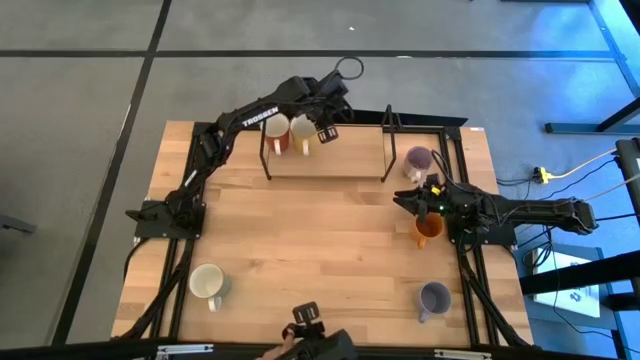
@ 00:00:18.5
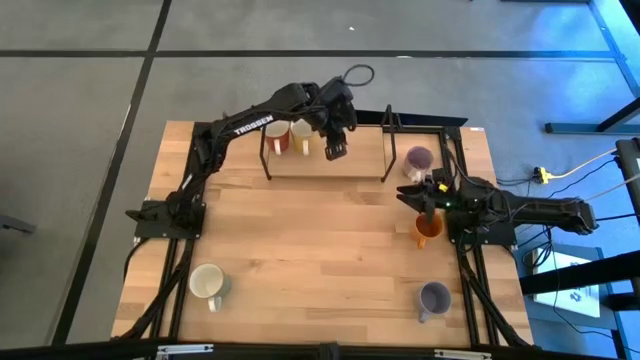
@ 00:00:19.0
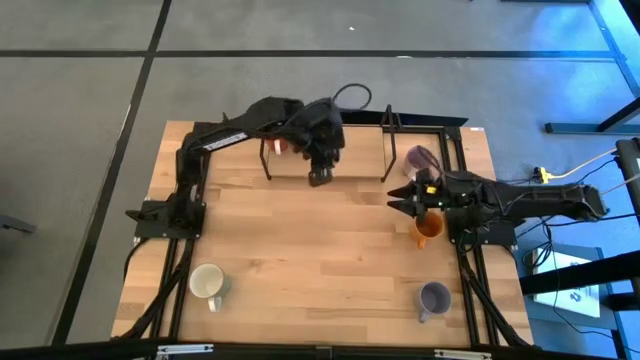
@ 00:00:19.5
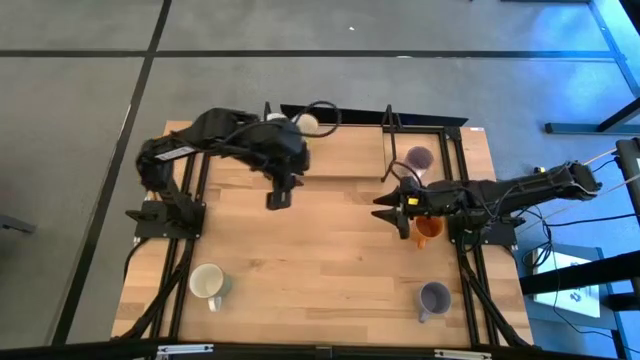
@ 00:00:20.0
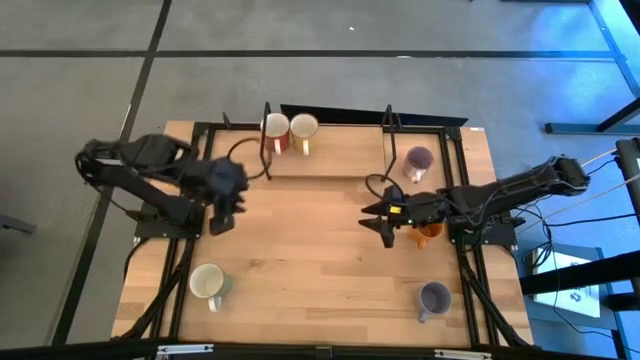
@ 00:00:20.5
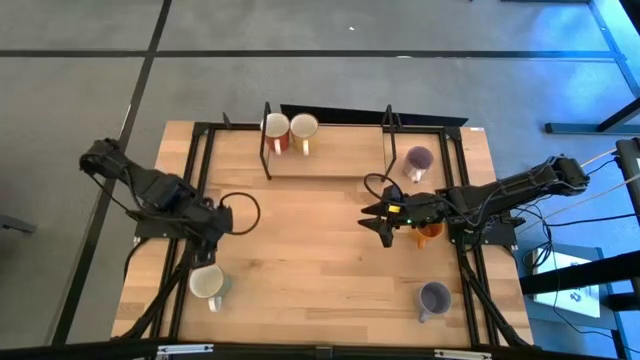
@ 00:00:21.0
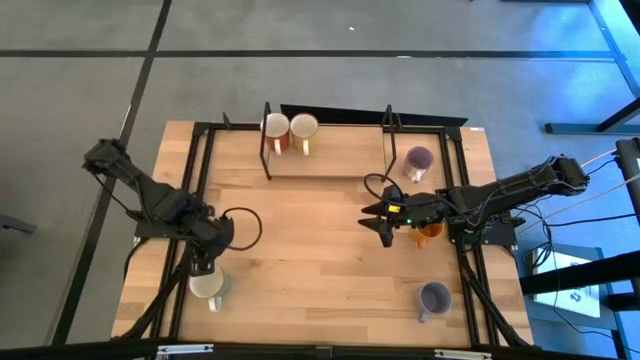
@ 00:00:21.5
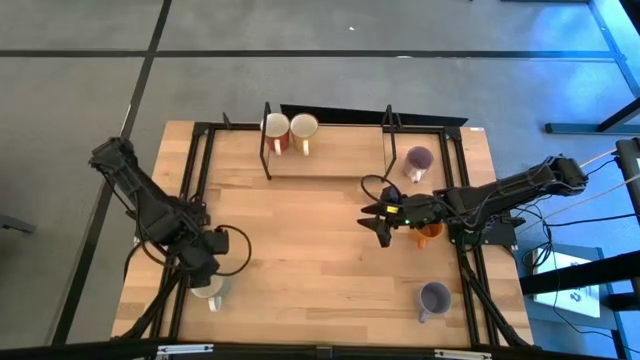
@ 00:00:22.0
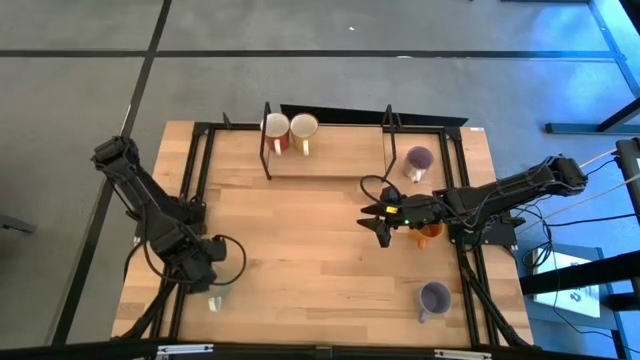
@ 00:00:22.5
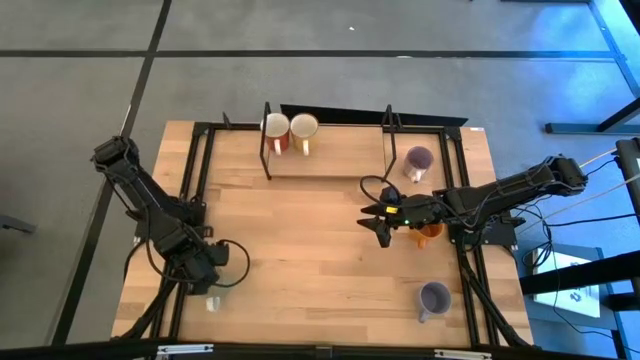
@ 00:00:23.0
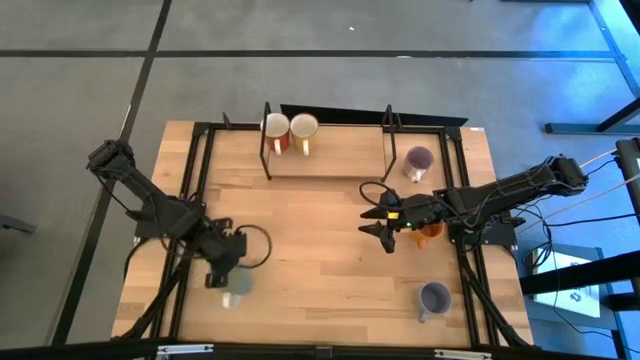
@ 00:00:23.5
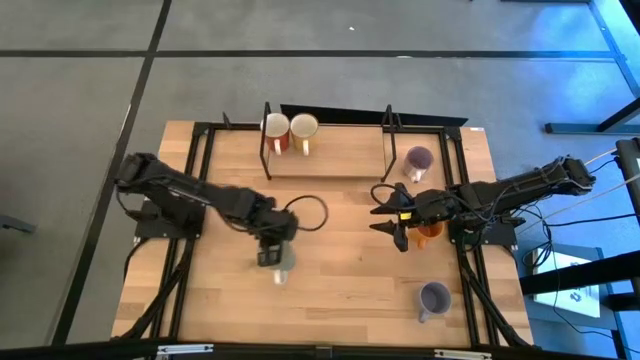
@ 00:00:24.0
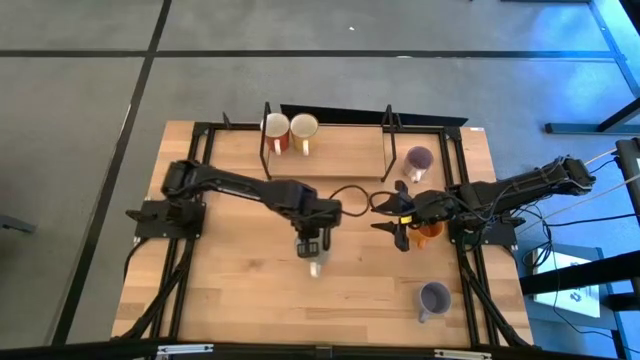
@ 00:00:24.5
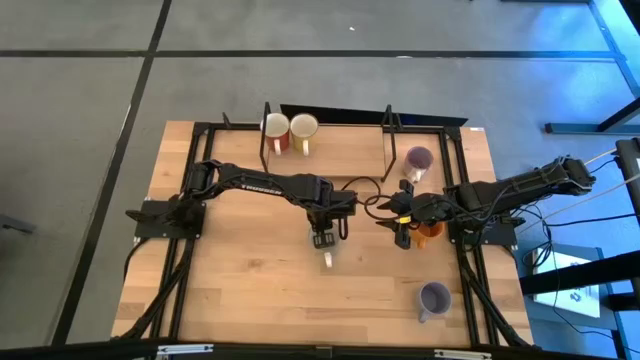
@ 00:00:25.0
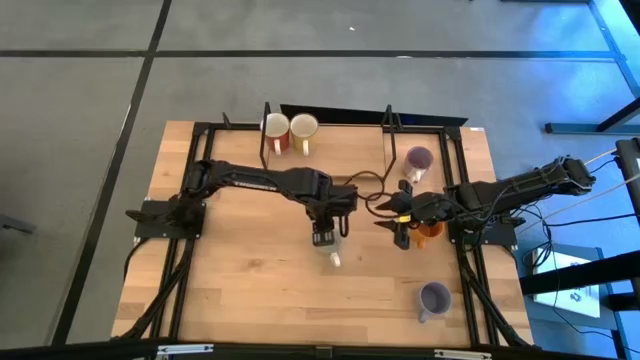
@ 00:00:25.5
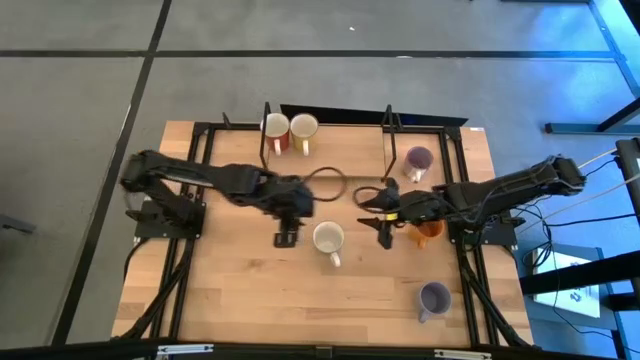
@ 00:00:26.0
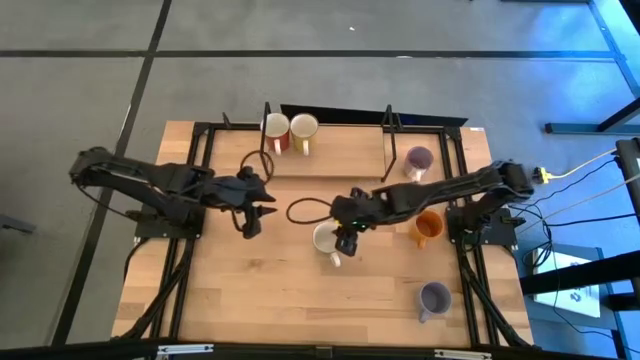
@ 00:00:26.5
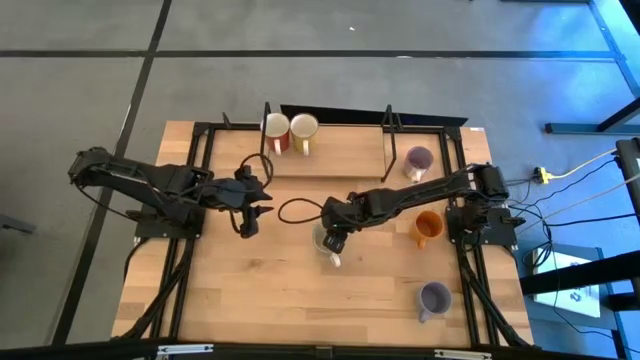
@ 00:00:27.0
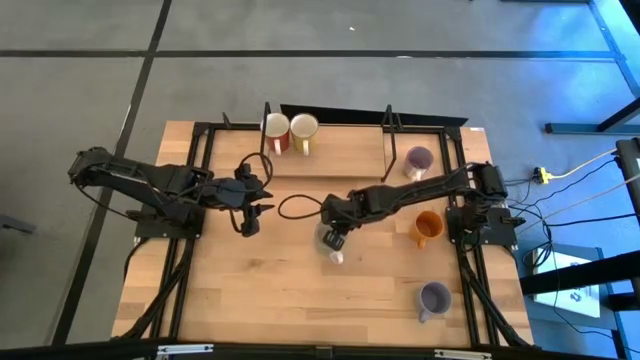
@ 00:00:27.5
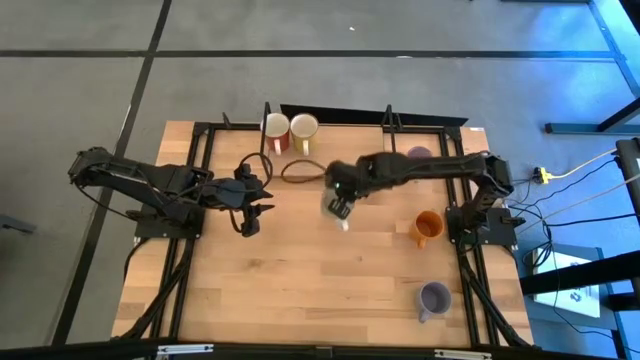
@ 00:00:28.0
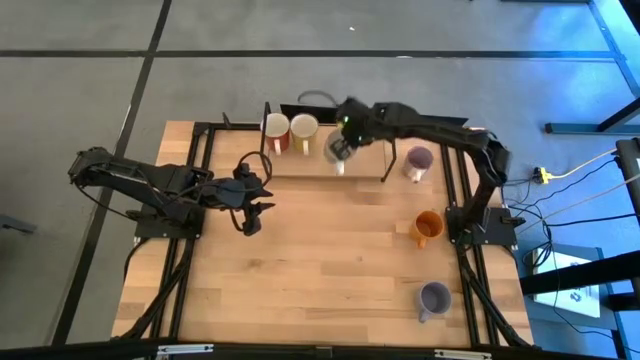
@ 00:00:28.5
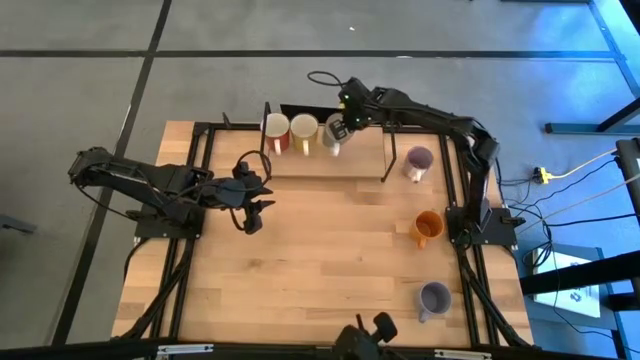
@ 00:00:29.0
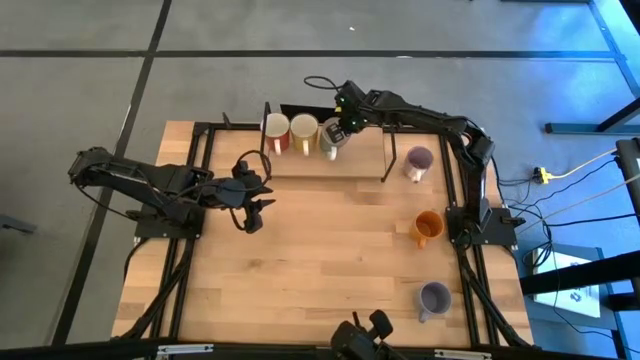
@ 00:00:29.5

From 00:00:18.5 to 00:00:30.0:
Task: Place coffee mugs
Put the light blue mug on the shelf

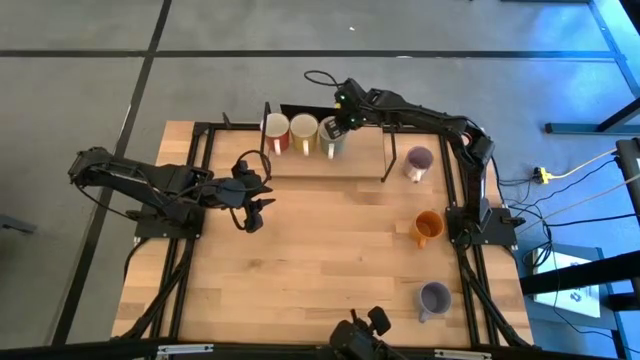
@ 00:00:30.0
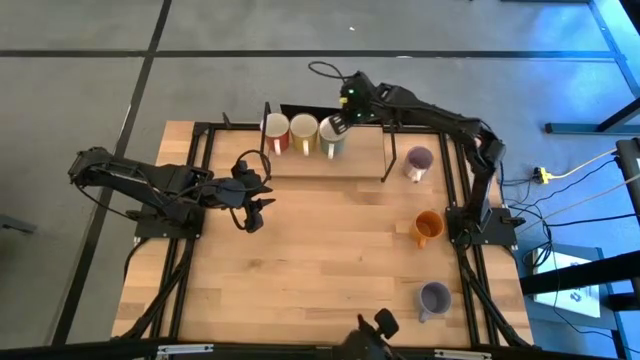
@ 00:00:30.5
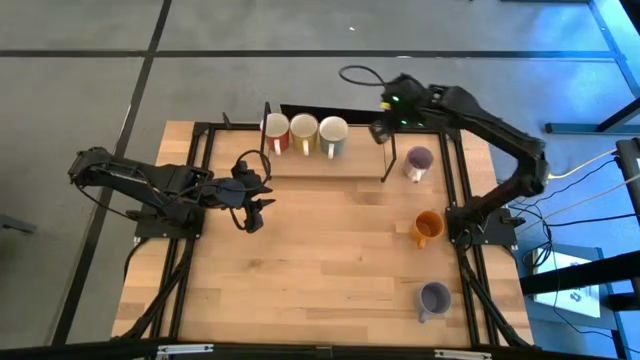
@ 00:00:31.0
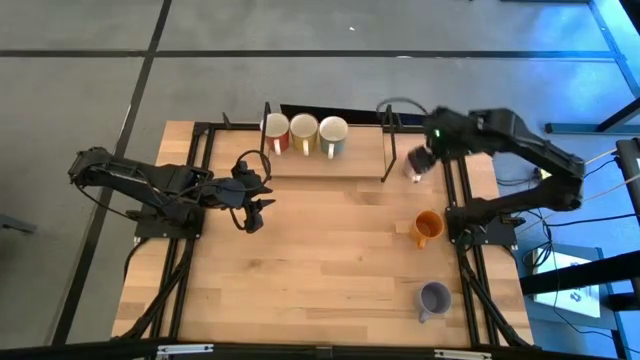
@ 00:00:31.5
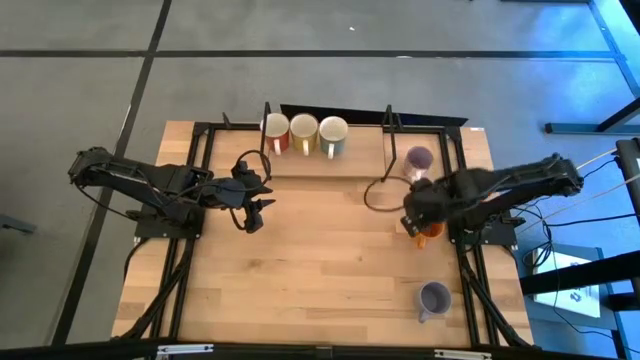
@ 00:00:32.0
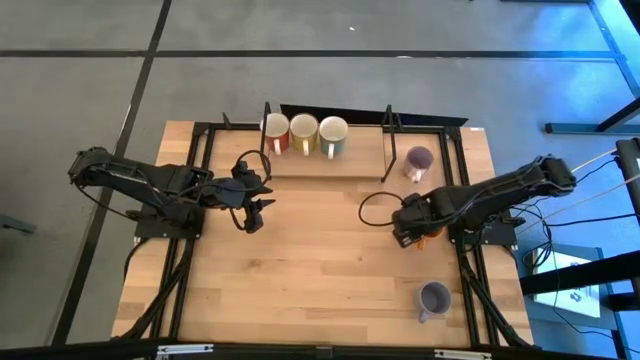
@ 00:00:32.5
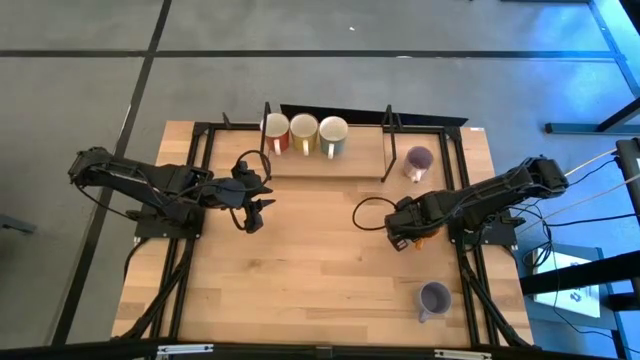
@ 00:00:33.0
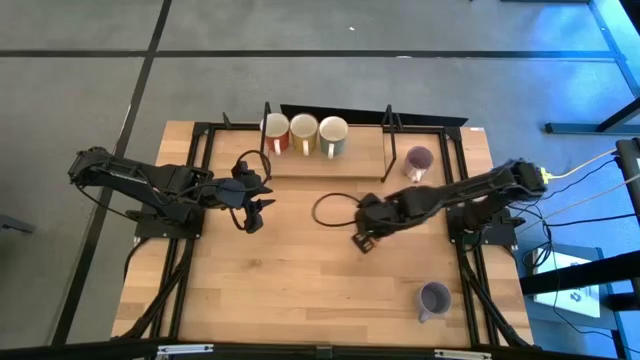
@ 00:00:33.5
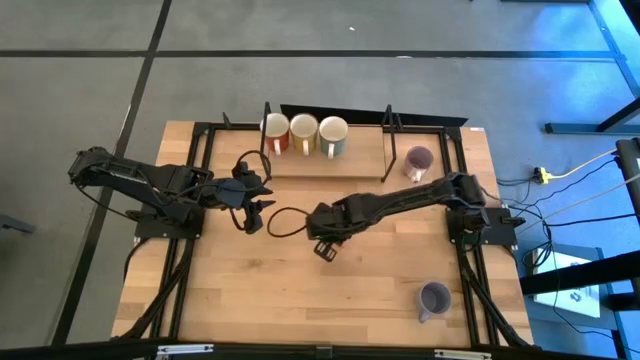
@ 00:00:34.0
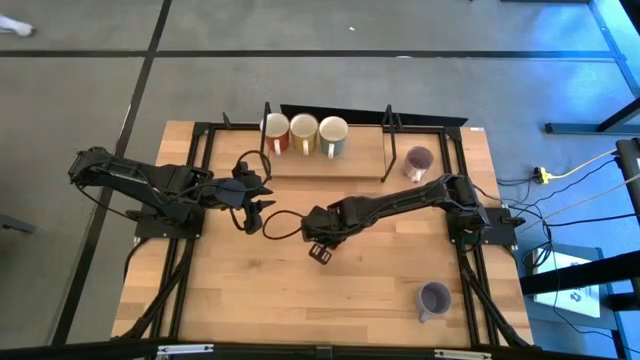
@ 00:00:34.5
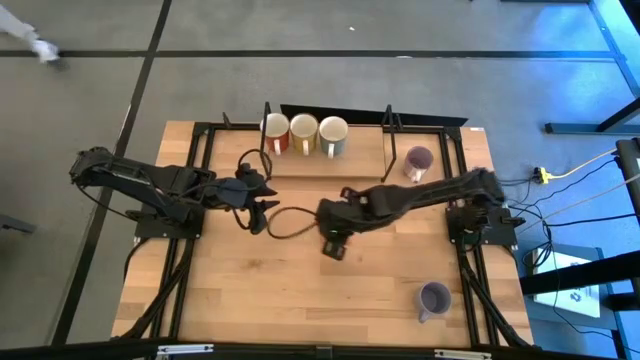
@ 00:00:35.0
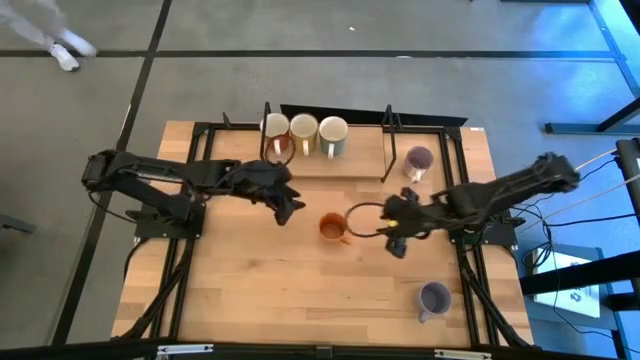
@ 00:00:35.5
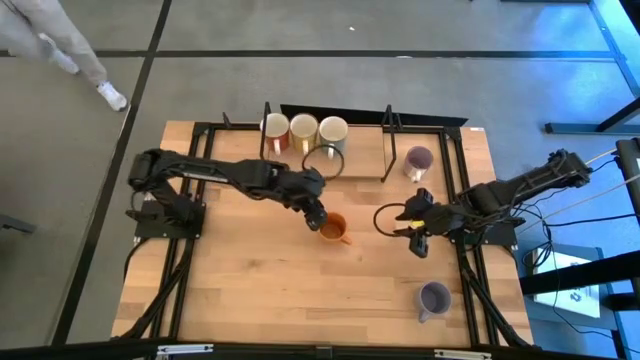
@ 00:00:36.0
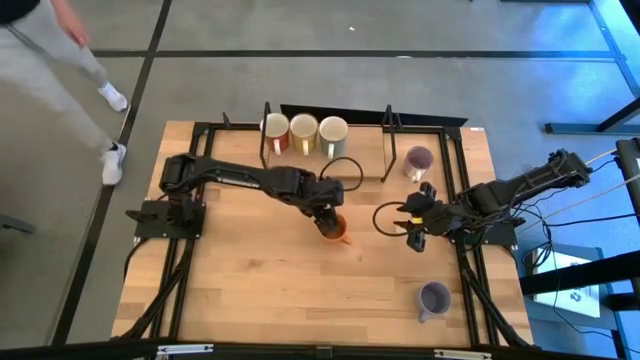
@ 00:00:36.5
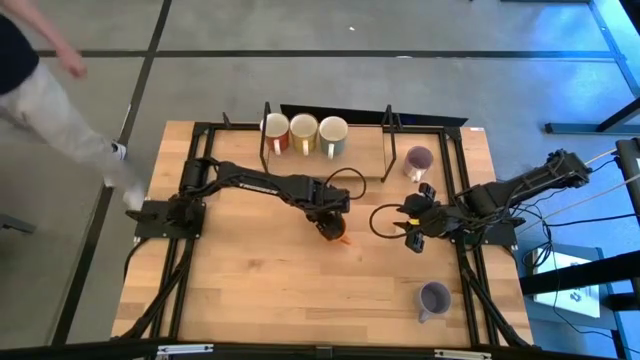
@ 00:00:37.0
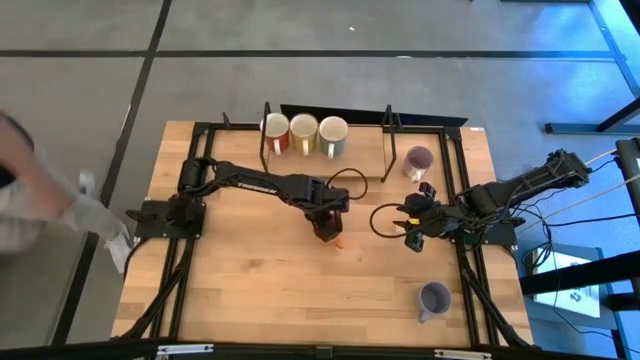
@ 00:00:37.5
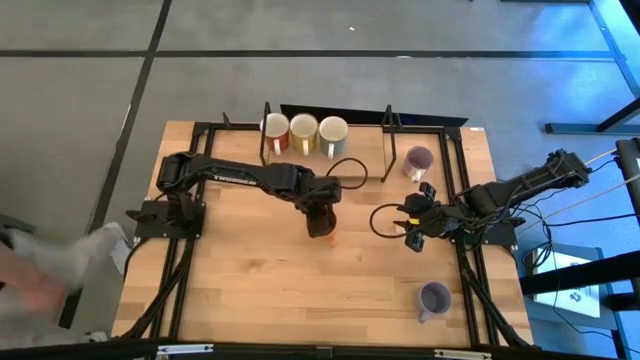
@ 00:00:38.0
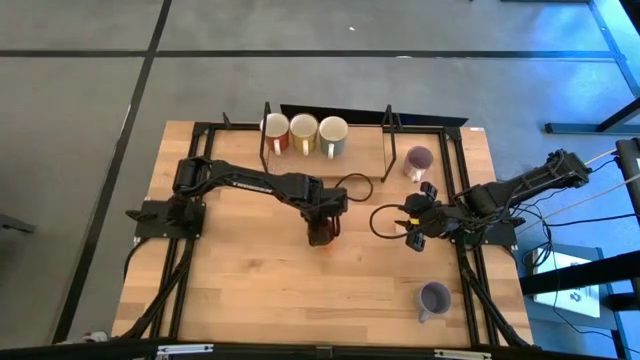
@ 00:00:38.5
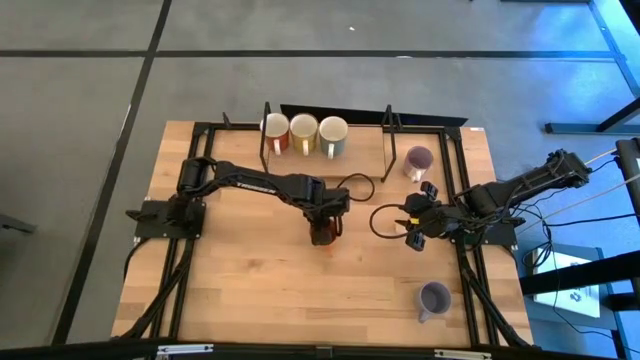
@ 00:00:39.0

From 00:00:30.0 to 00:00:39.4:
Move the orange mug to the middle of the table
